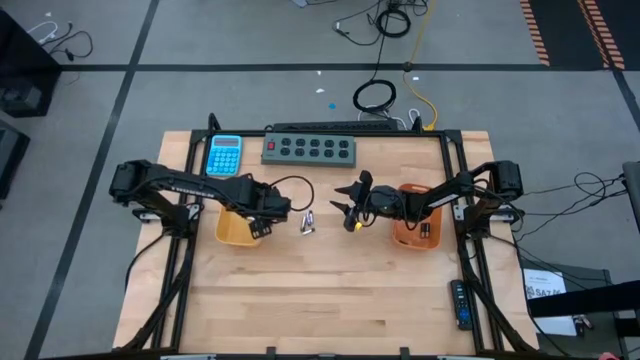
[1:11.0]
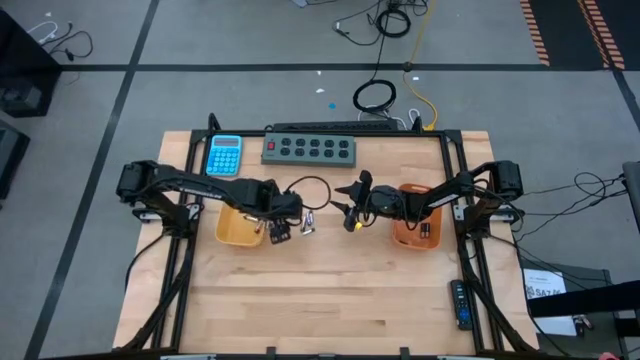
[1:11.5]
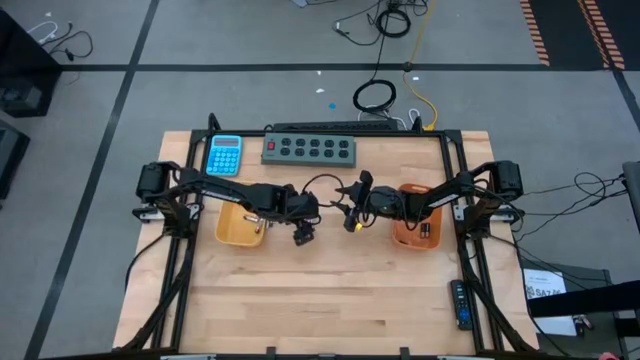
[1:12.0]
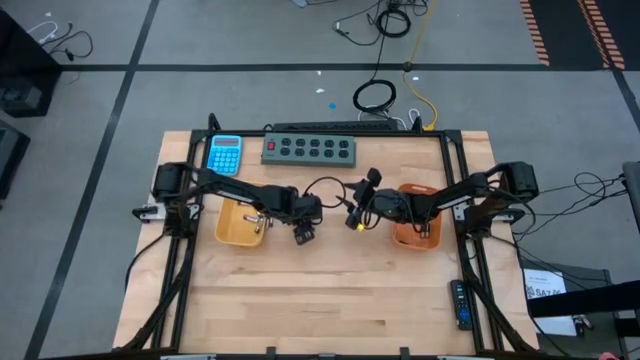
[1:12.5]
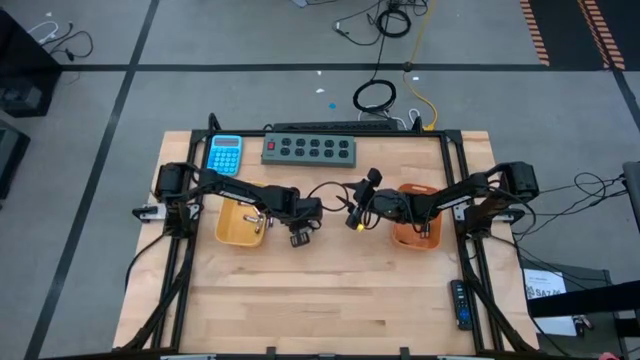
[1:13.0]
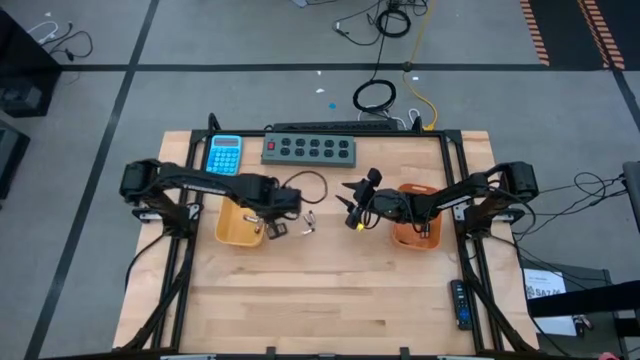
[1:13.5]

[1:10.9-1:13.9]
Task: Sort batteries
Put the white battery into the yellow bin

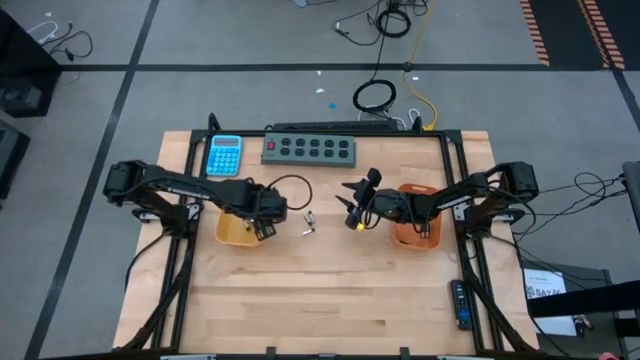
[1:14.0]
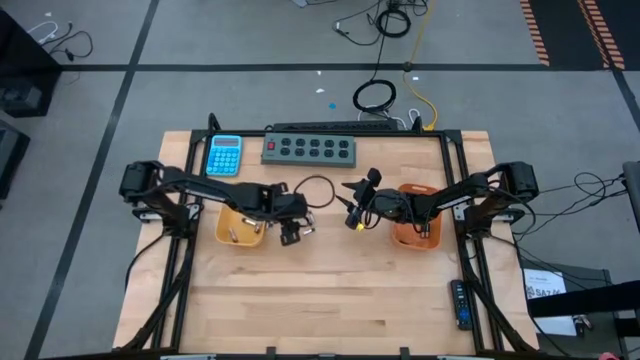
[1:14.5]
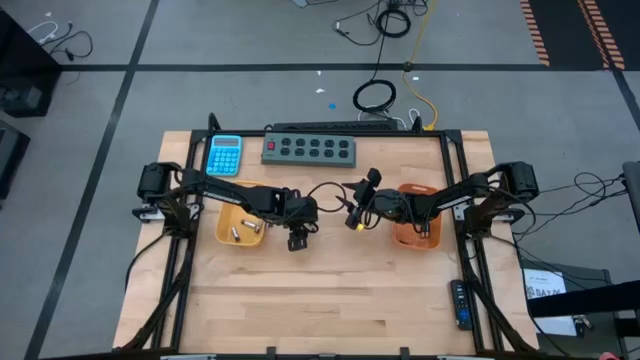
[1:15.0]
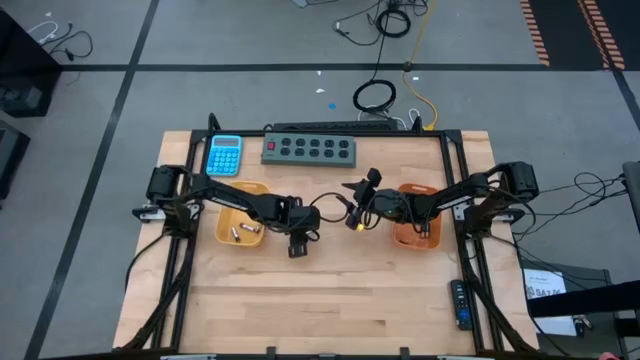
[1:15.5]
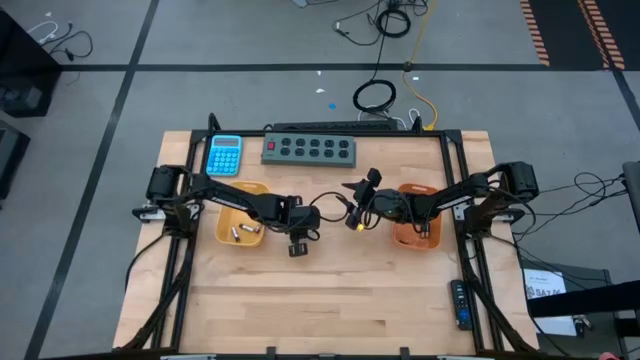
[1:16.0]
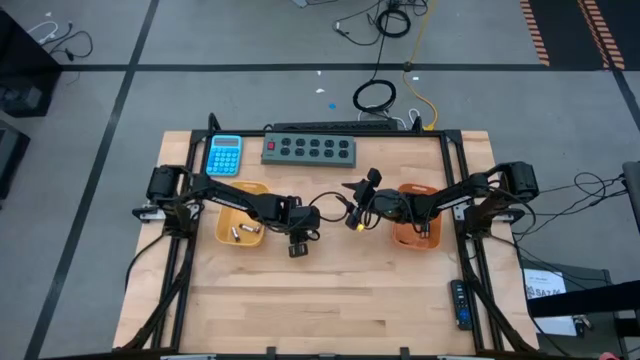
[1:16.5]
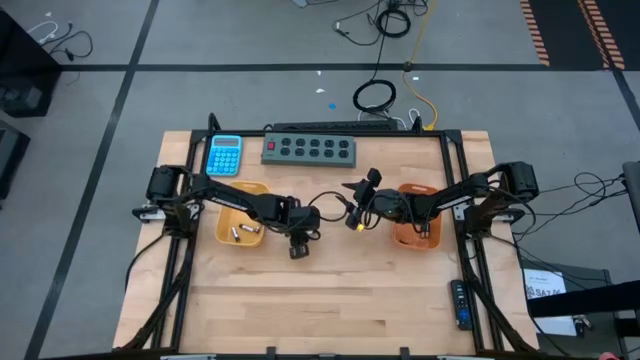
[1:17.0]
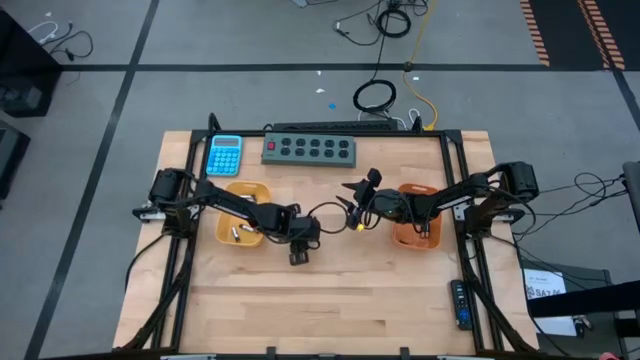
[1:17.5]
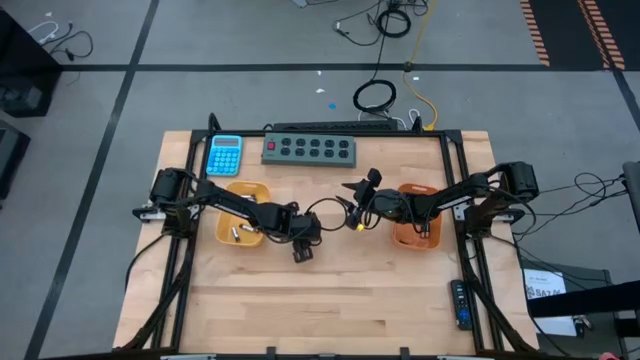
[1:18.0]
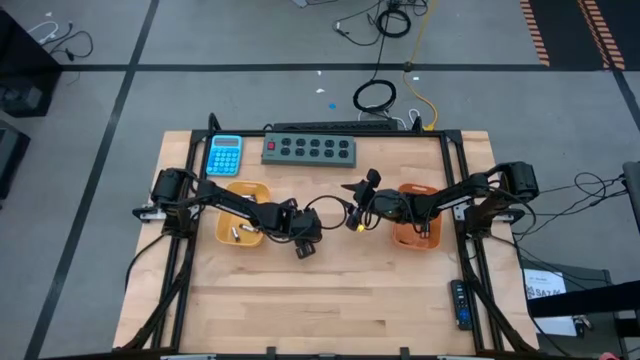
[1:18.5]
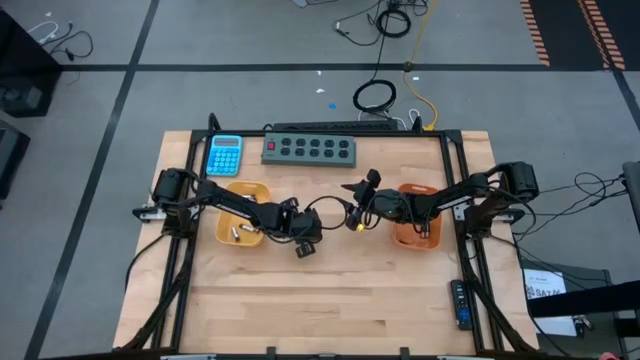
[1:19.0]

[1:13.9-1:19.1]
Put the white battery into the yellow bin

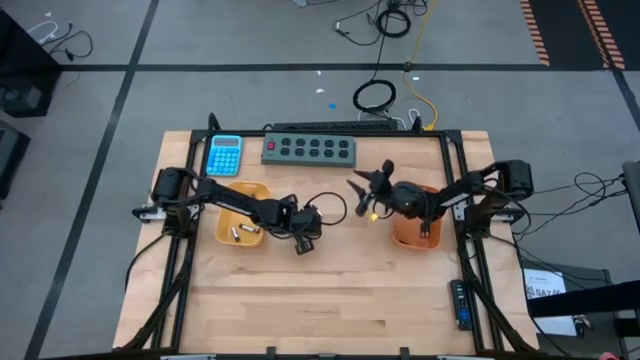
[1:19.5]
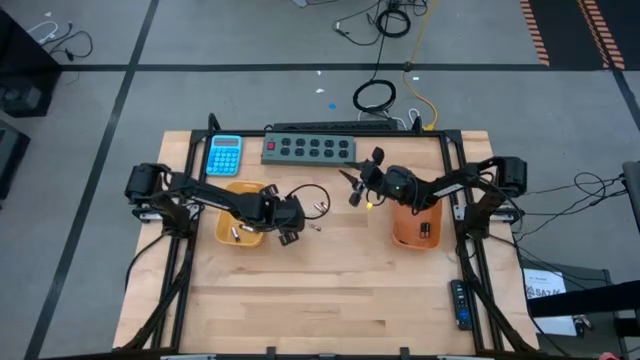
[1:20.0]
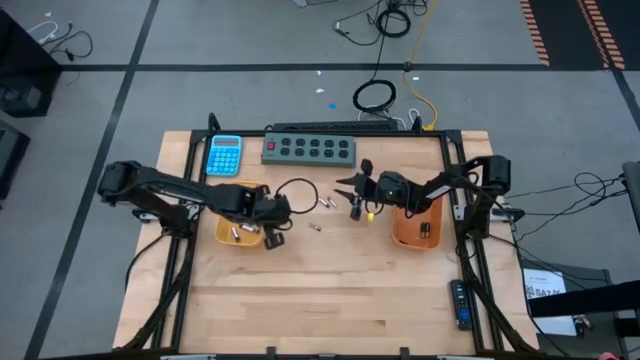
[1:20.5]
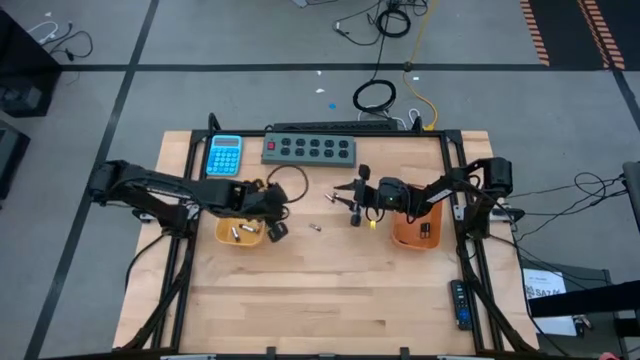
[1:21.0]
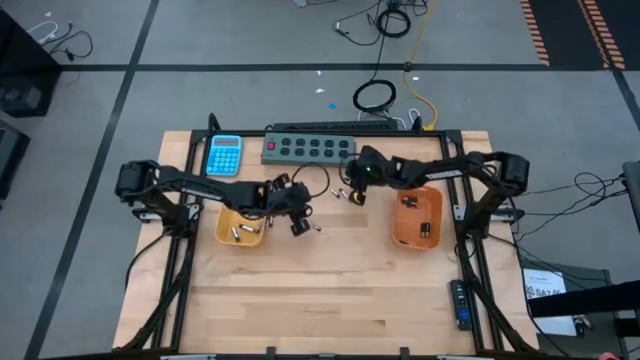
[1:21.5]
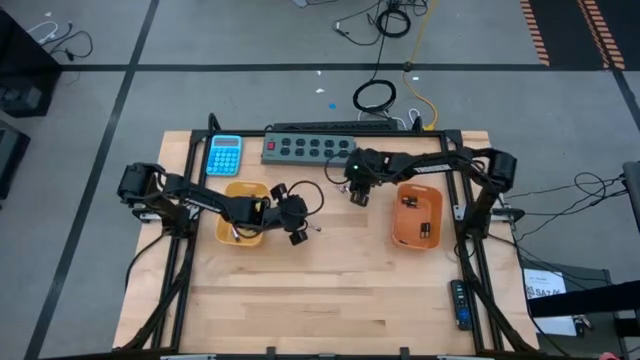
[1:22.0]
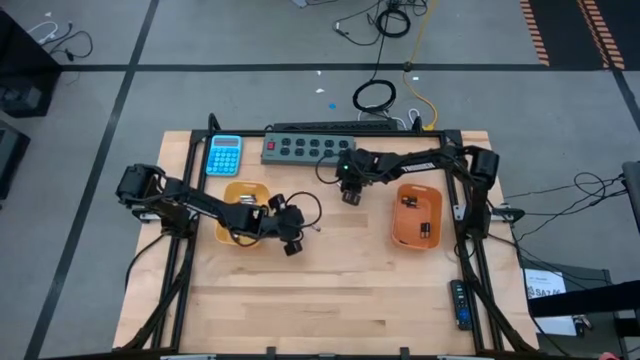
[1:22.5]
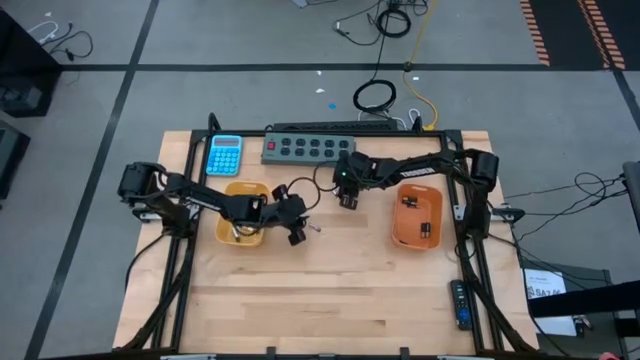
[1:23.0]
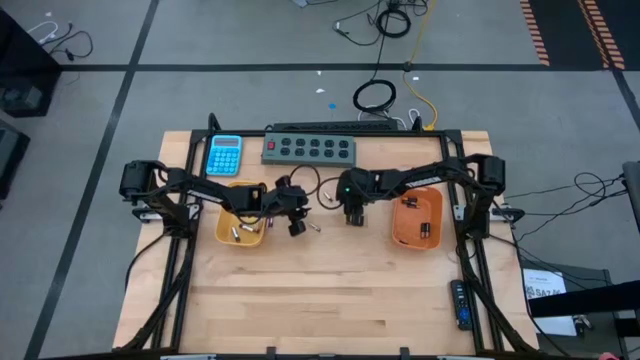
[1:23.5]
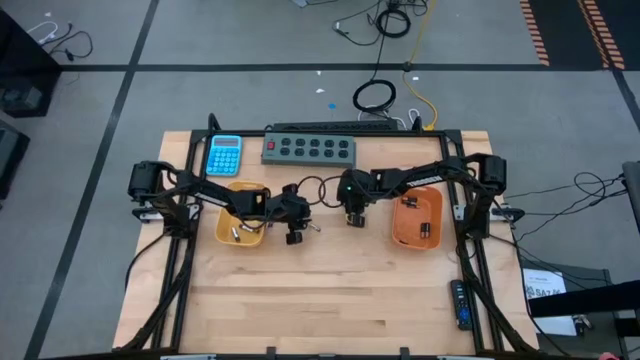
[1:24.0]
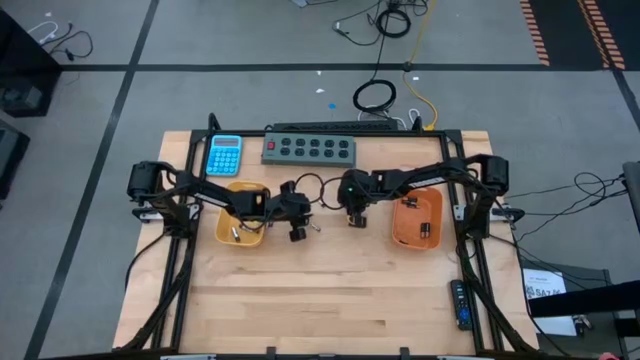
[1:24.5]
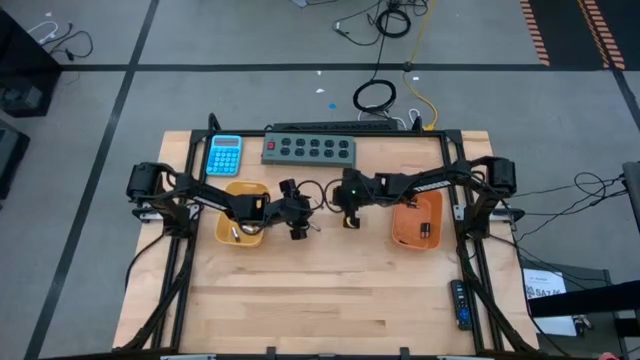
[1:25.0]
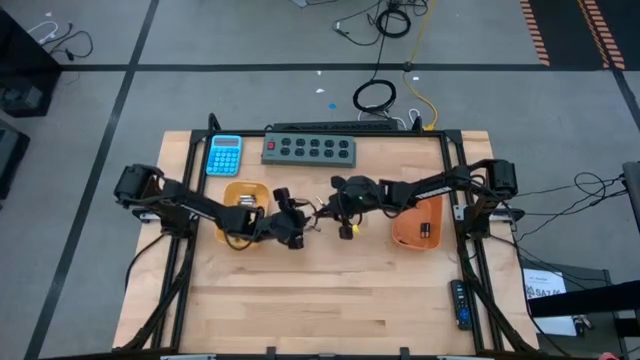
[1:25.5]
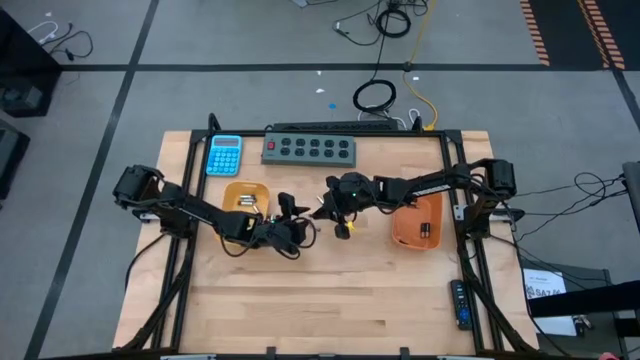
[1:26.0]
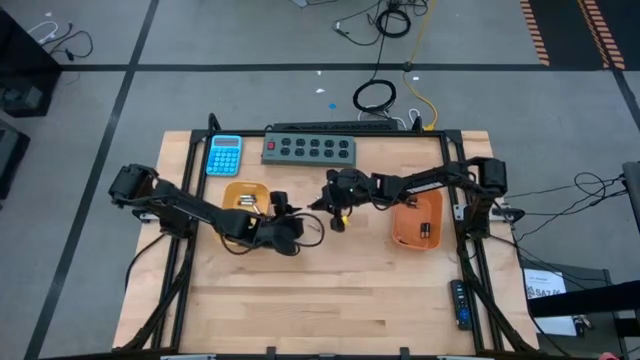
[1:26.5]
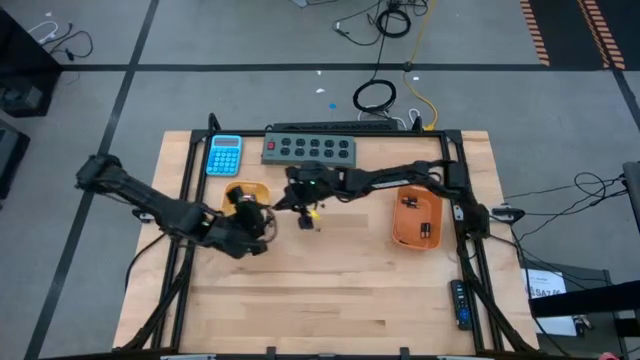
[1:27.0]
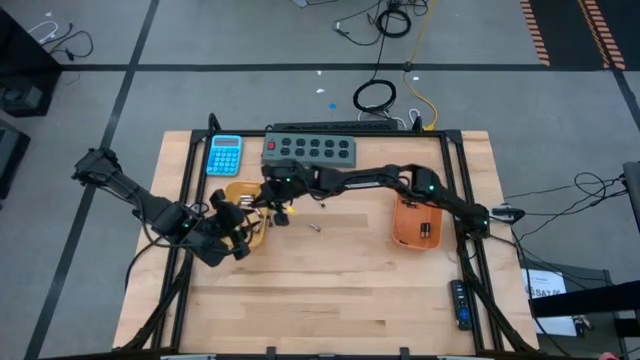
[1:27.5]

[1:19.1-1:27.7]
Put the white battery into the yellow bin

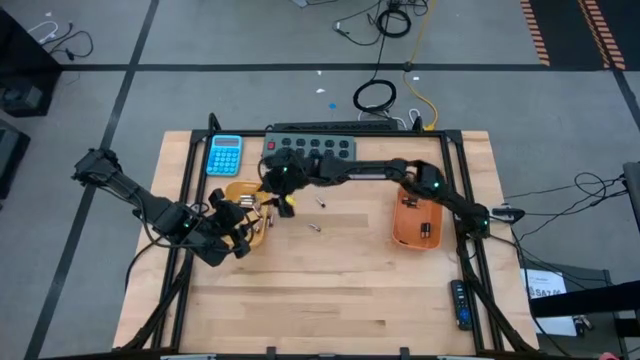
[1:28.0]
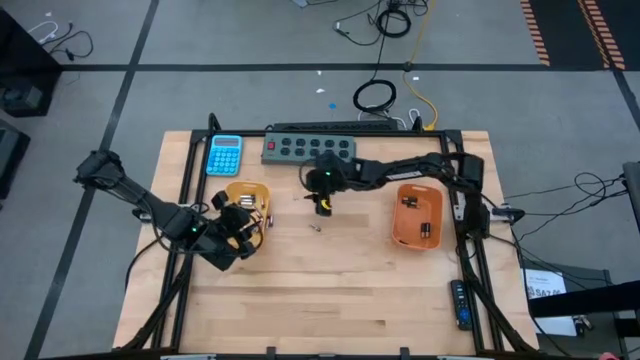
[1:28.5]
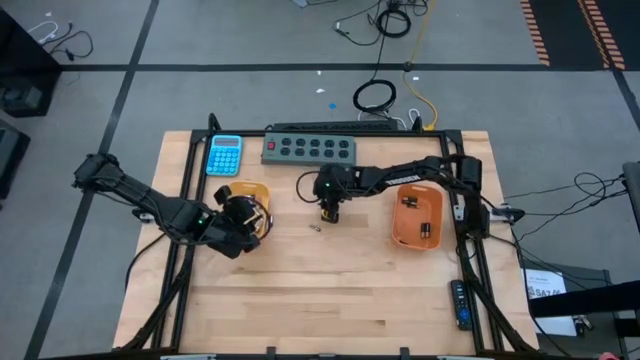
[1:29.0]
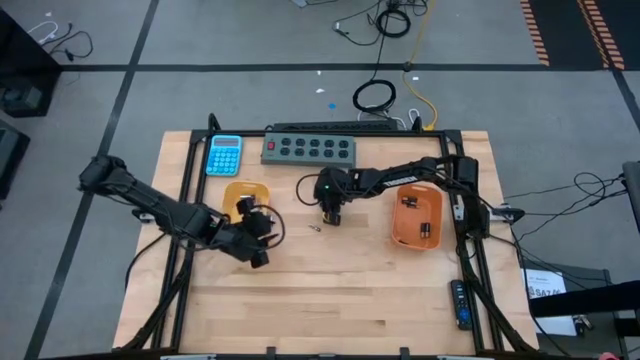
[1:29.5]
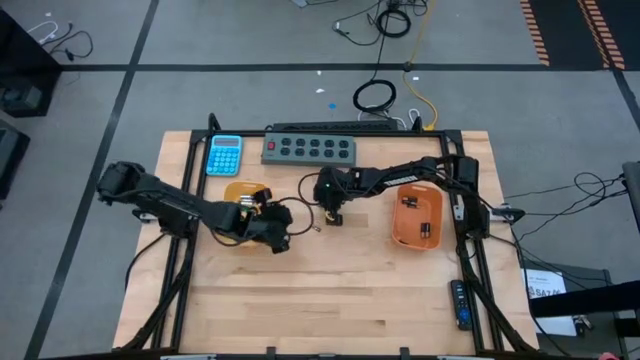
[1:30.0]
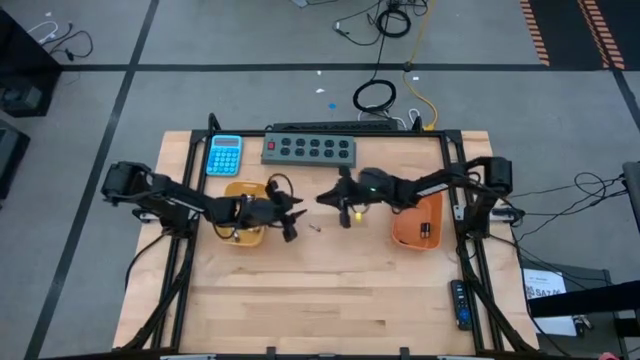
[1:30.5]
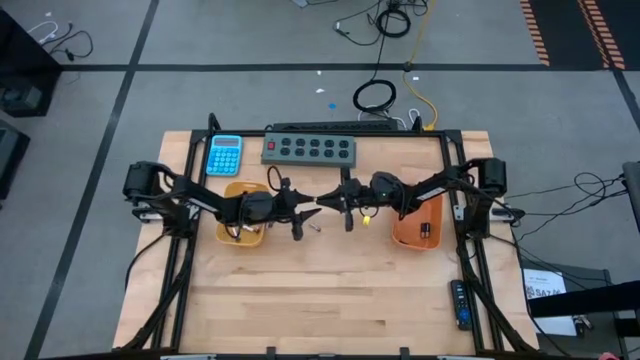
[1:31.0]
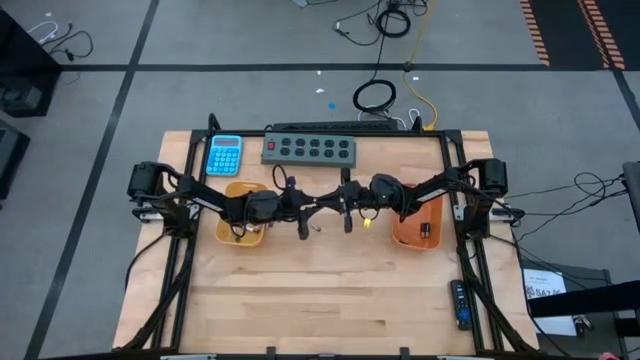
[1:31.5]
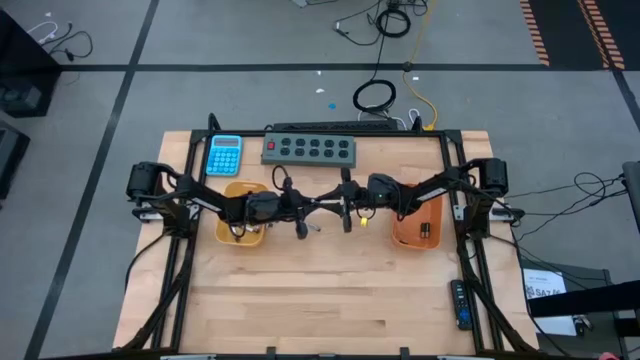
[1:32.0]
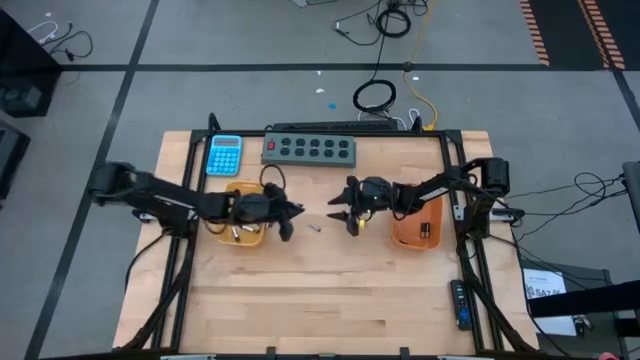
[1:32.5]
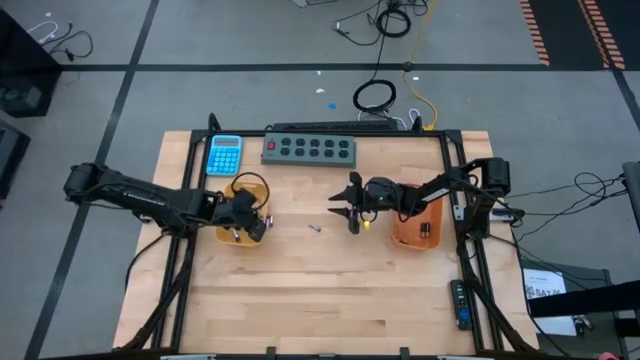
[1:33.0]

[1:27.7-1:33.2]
Put the white battery into the yellow bin

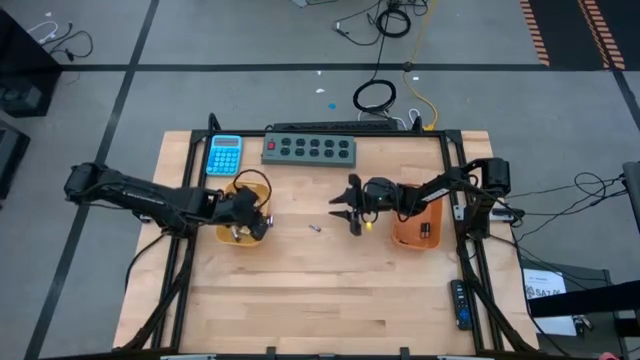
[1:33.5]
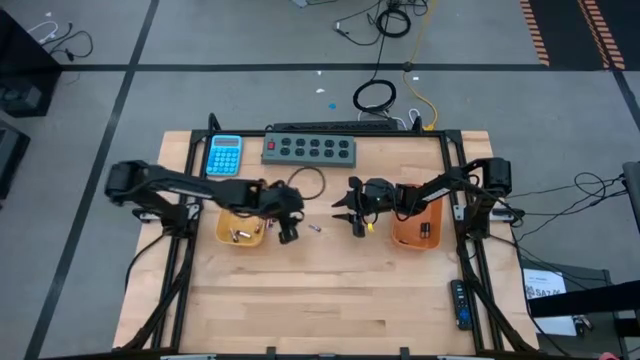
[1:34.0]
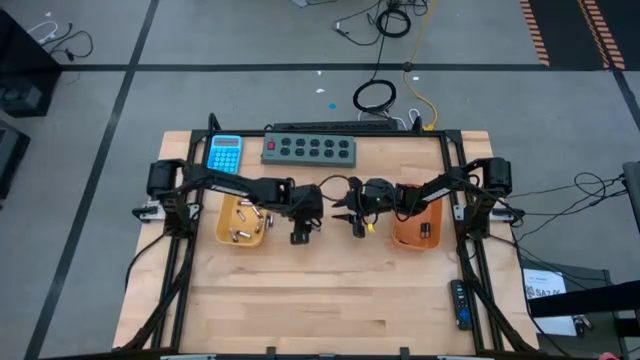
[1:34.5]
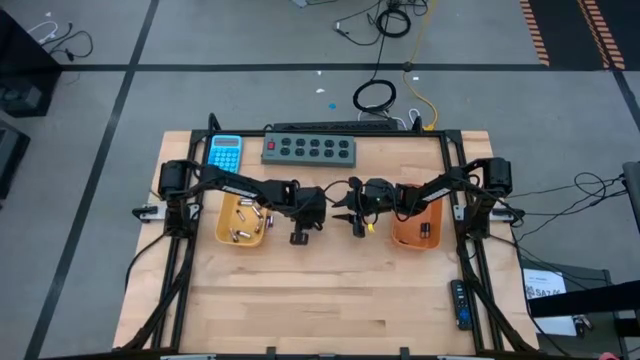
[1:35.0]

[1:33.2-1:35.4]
Put the white battery into the yellow bin
